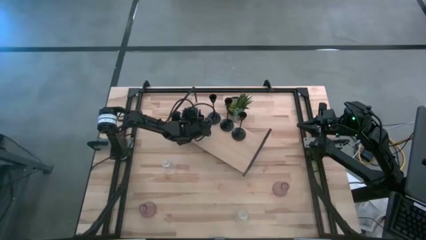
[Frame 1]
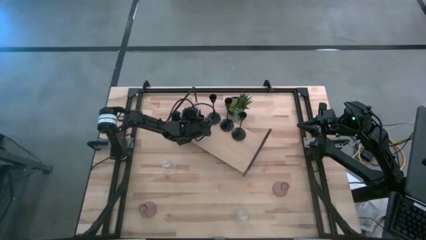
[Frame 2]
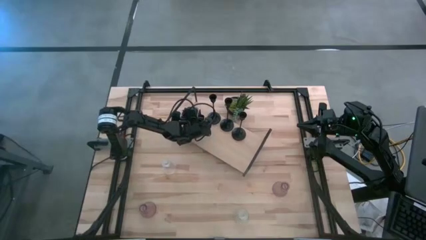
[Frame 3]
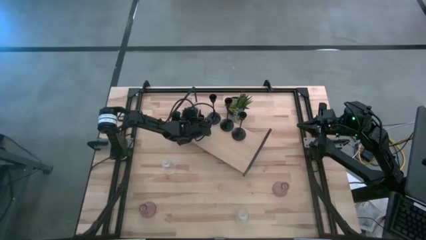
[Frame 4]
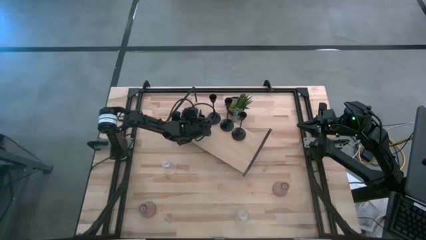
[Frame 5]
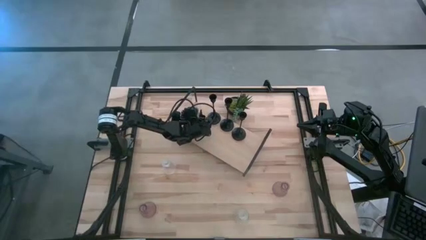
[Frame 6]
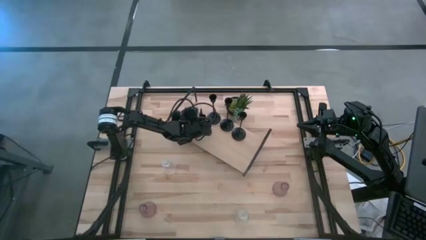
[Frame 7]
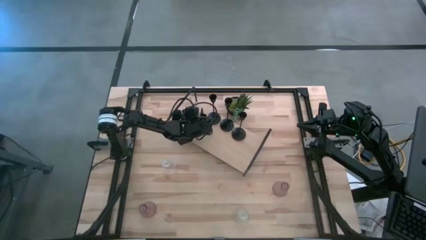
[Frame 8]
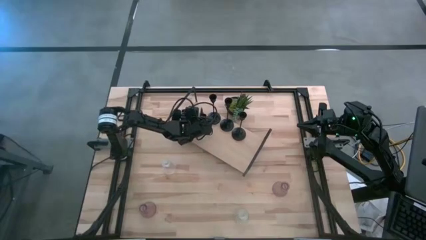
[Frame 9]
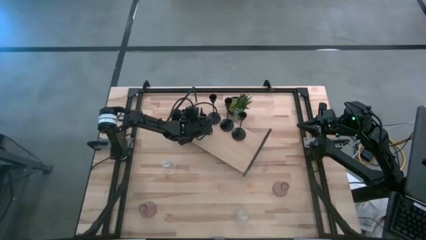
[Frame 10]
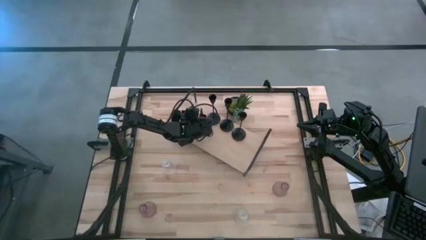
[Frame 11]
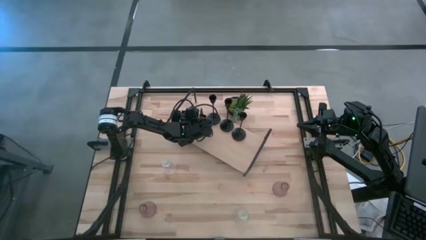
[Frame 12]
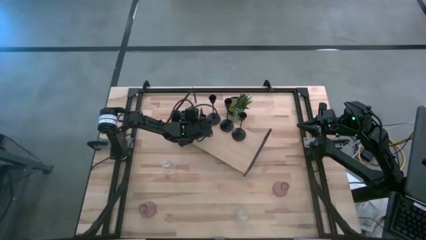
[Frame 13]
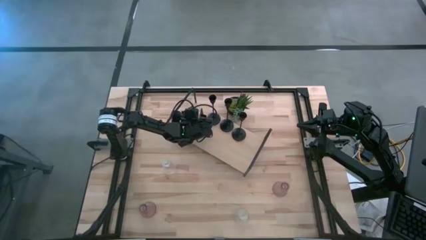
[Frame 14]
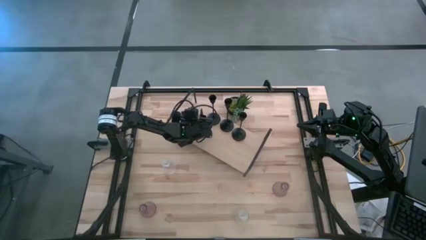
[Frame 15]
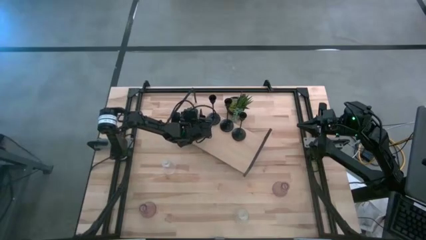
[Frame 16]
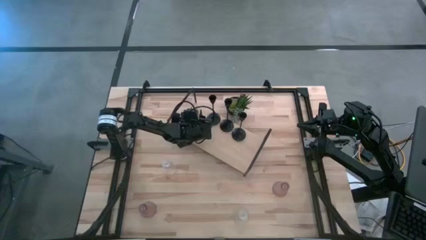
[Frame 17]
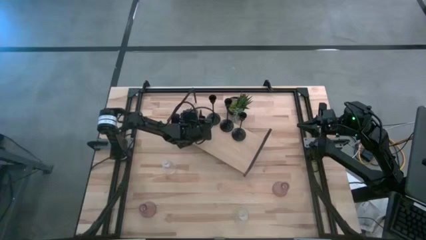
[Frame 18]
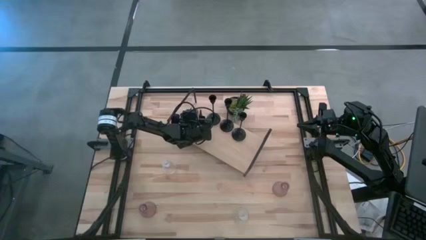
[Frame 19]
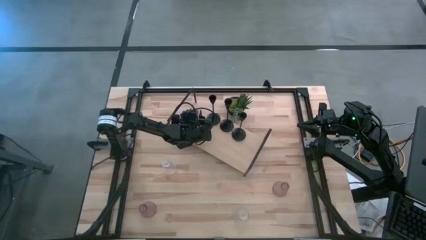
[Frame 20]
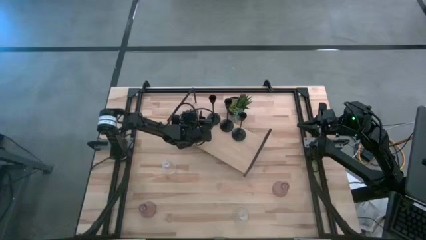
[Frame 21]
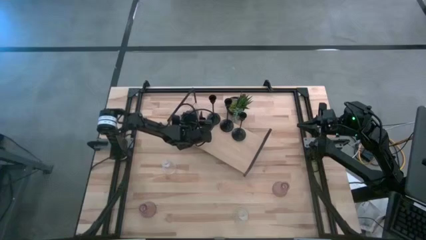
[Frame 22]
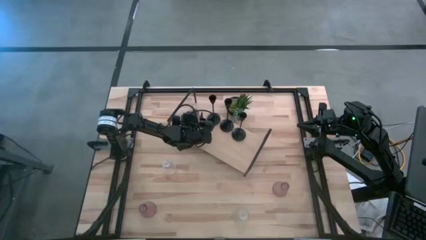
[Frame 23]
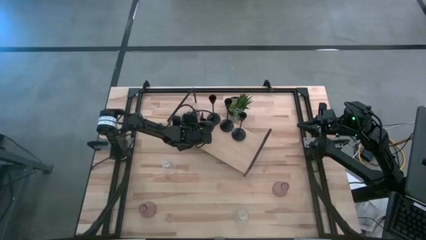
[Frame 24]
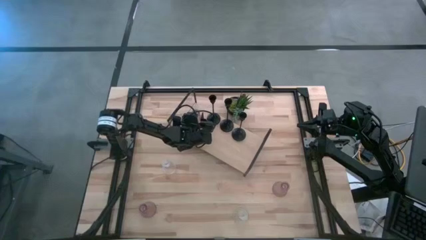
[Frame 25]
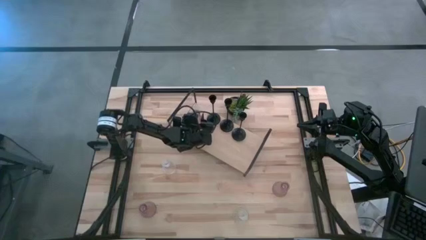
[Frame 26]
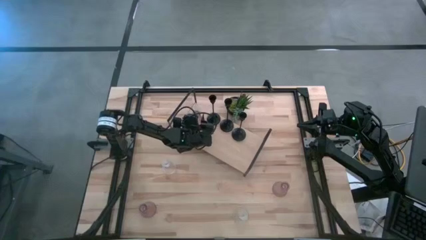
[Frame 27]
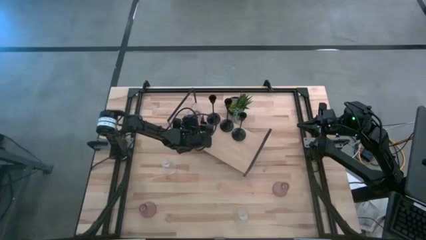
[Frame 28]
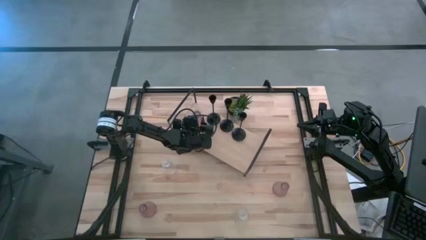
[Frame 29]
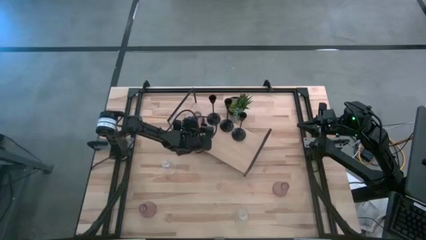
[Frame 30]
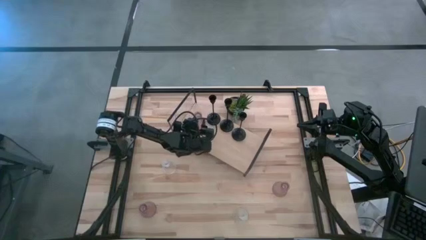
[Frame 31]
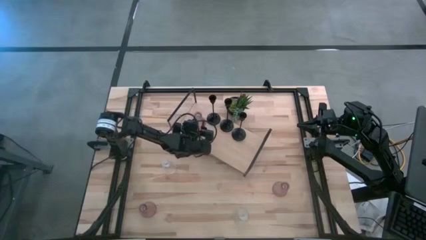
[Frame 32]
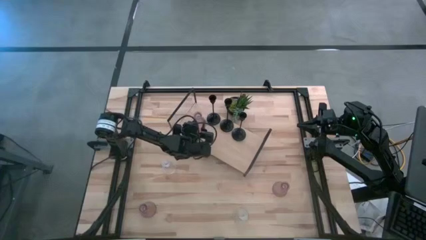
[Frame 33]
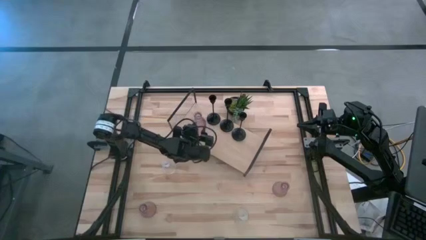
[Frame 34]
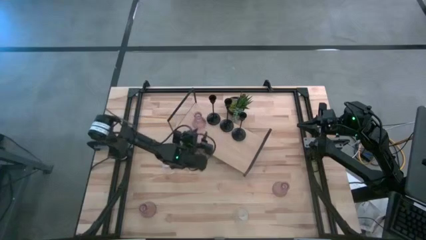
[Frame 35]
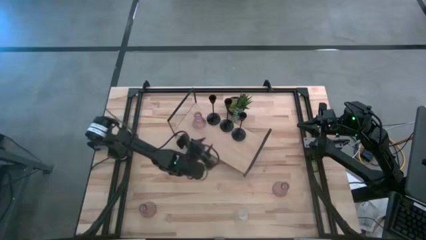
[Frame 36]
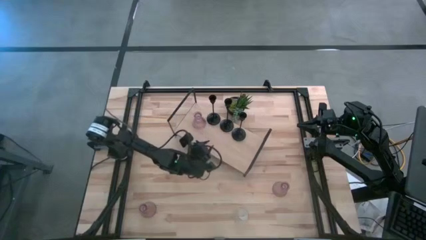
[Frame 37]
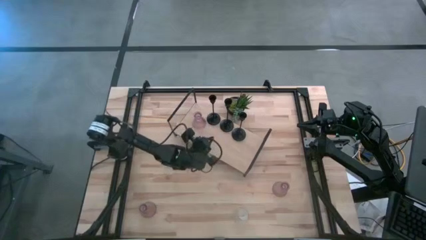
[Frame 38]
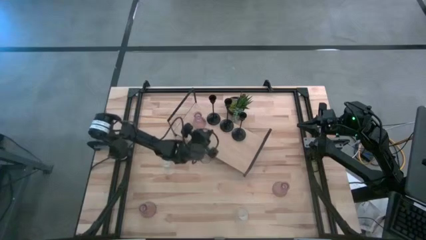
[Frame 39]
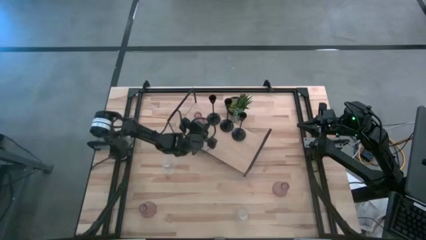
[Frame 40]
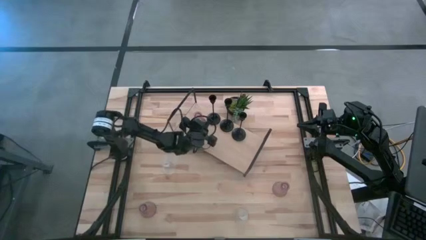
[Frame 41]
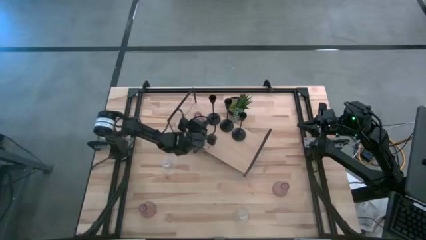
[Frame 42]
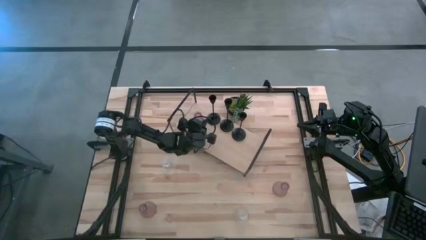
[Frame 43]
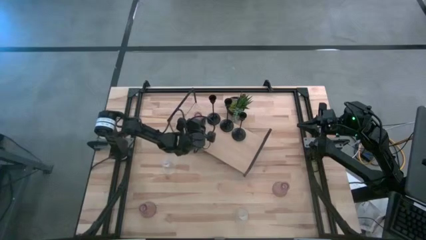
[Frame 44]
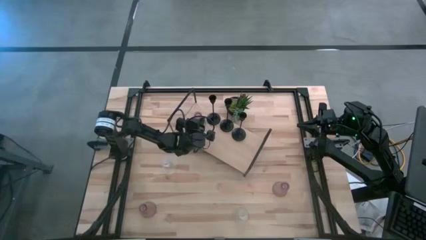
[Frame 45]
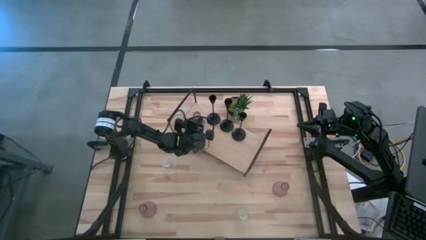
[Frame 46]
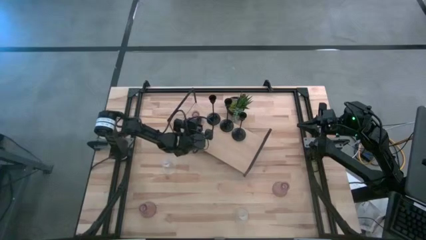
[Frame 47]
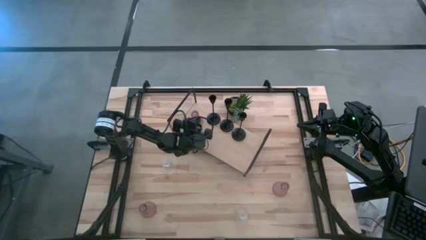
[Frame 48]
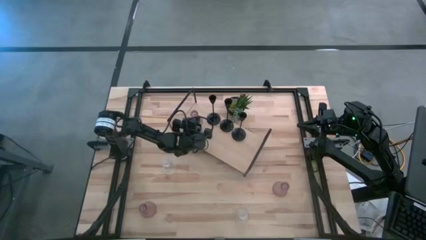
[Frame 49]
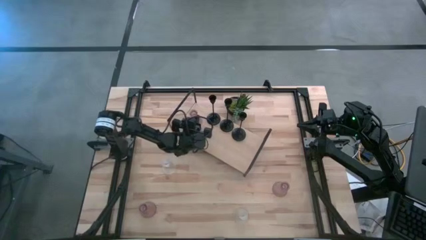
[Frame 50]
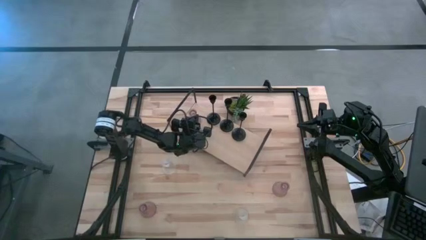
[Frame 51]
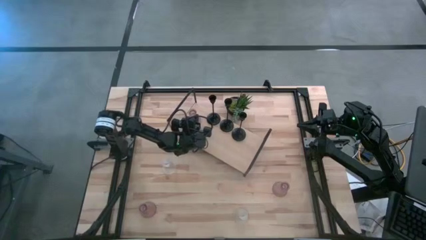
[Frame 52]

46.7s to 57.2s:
Task: Pick & Place candle stick holders
Put the middle pink glass candle holder on the shelf

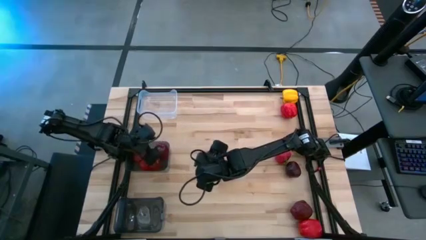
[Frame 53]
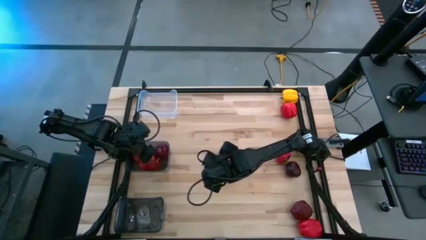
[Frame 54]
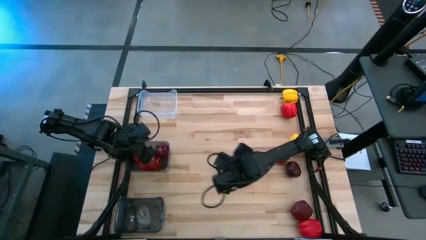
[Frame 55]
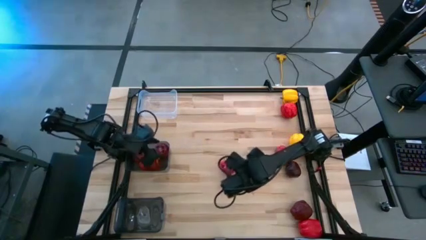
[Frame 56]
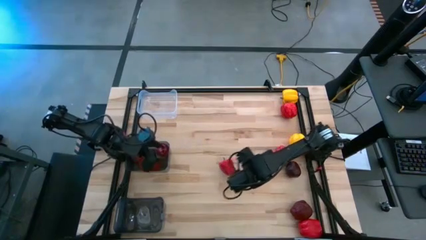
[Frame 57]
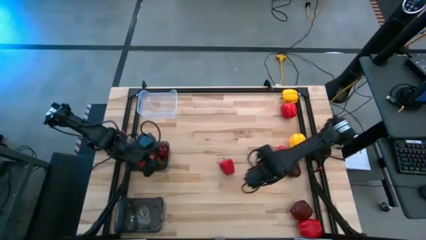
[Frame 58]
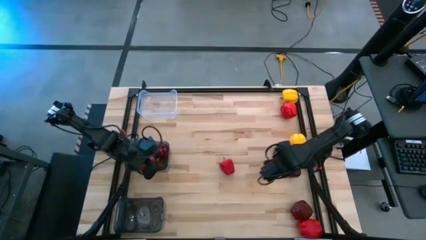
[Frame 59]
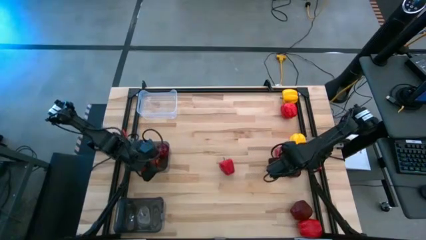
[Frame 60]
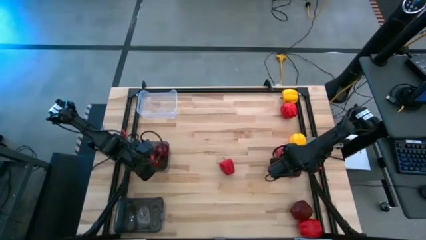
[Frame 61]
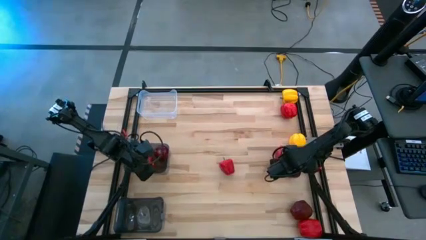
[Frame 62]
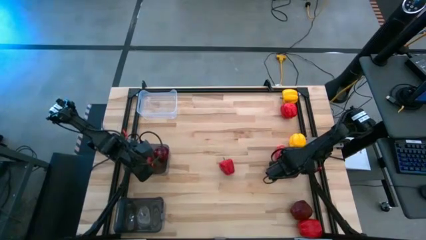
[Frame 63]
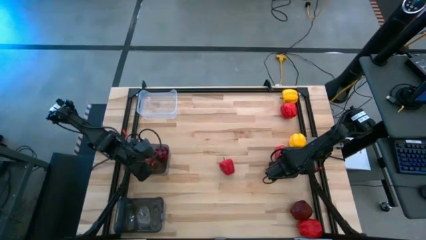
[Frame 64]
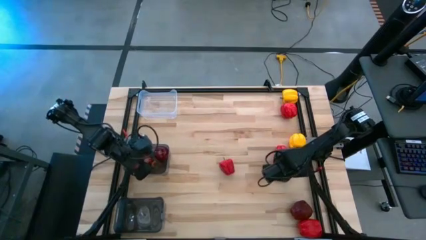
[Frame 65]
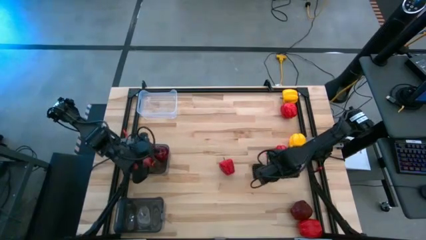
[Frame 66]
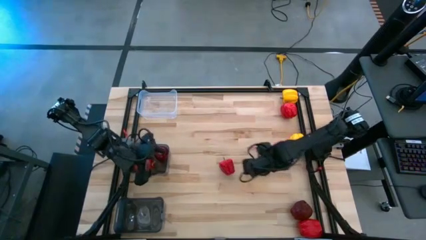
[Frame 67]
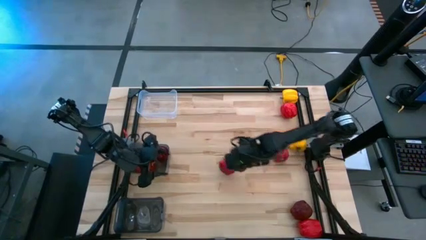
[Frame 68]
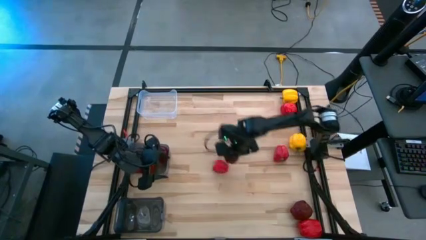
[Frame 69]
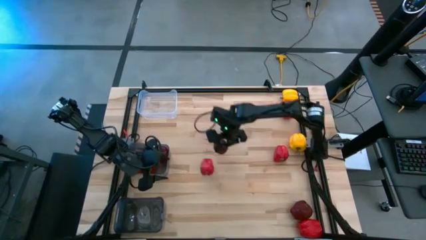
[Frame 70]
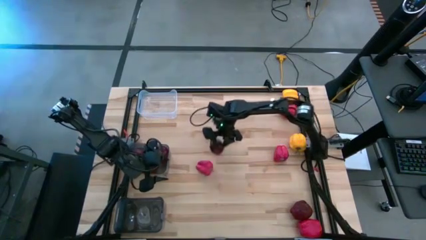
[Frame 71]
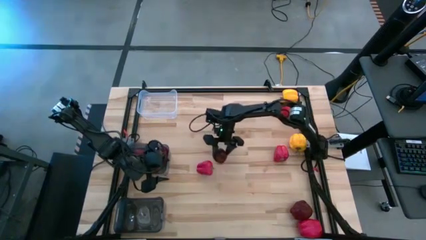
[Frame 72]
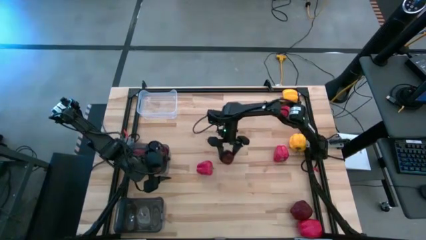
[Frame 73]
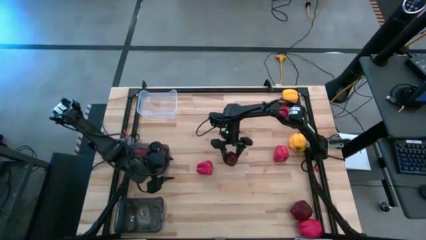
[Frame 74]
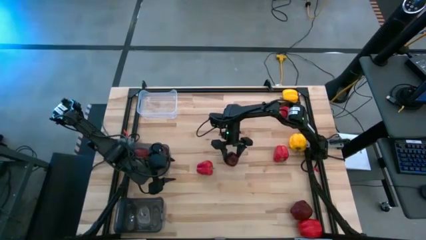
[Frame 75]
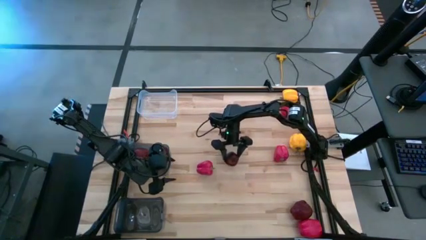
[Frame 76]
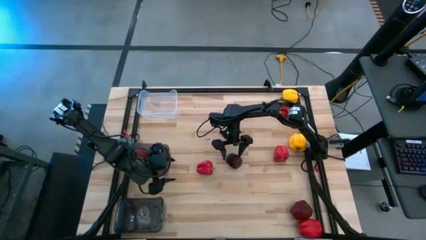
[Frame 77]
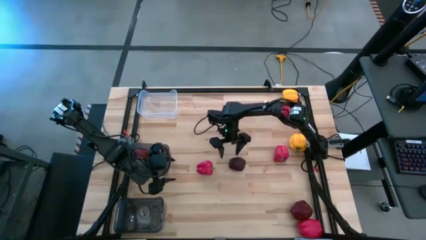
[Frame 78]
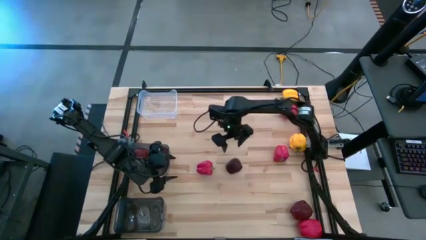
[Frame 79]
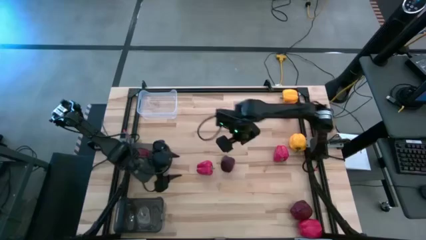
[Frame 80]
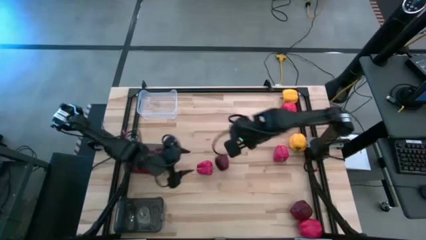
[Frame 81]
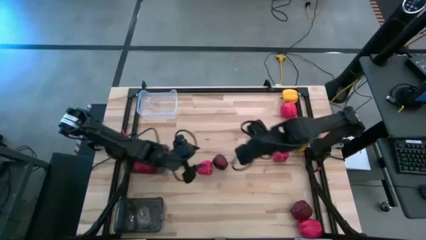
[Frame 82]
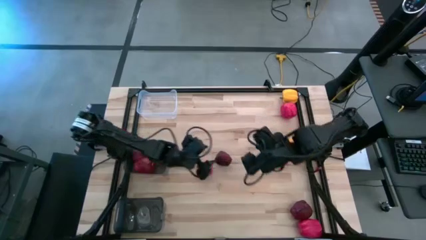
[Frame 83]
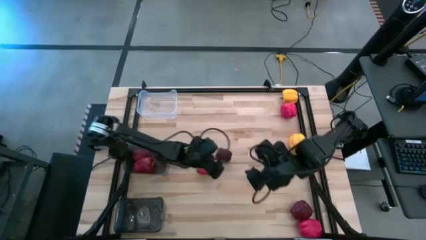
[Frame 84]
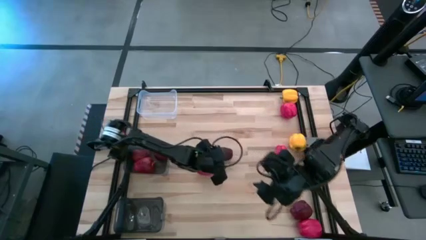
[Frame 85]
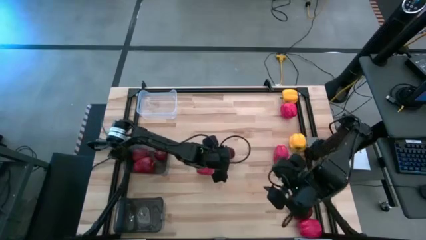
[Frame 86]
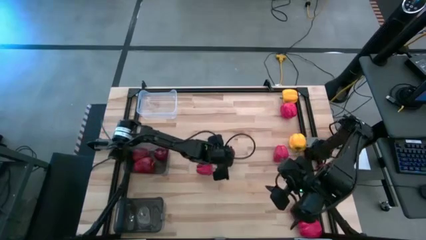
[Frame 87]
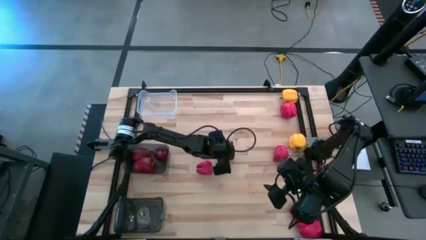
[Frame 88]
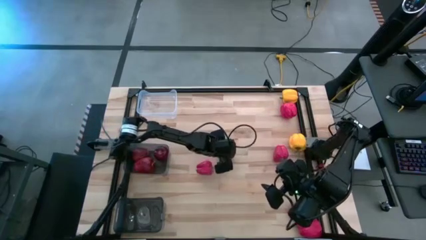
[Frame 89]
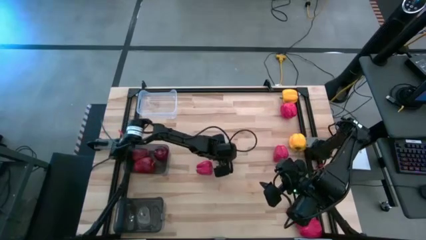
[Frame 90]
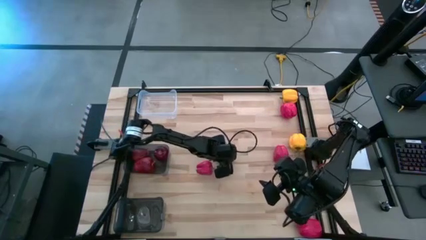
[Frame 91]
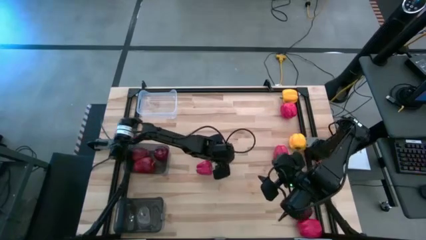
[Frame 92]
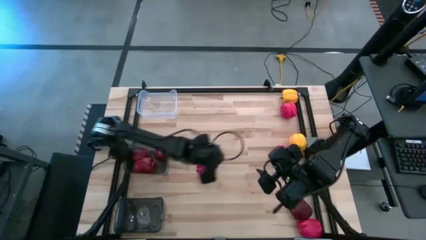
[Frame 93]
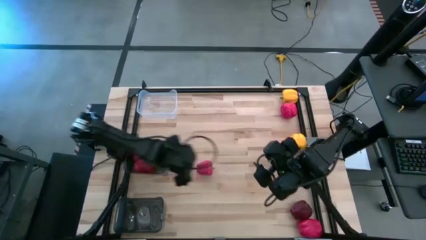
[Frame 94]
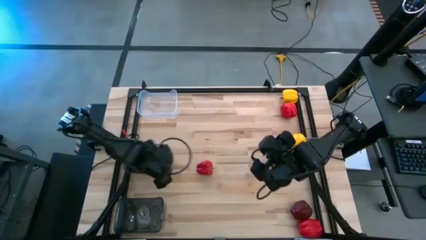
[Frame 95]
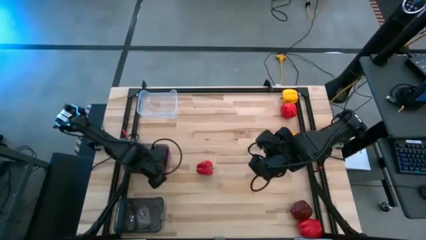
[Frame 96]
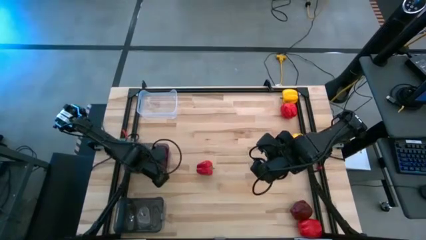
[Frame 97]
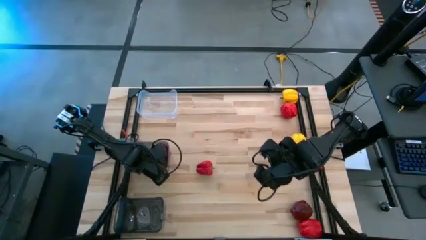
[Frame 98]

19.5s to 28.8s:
Task: Sort produce into baskets
Put the red apple into the top black bin
